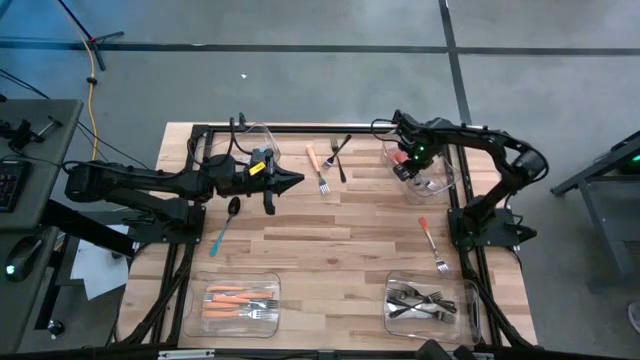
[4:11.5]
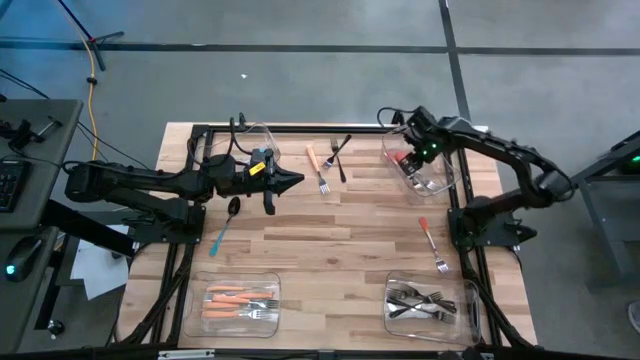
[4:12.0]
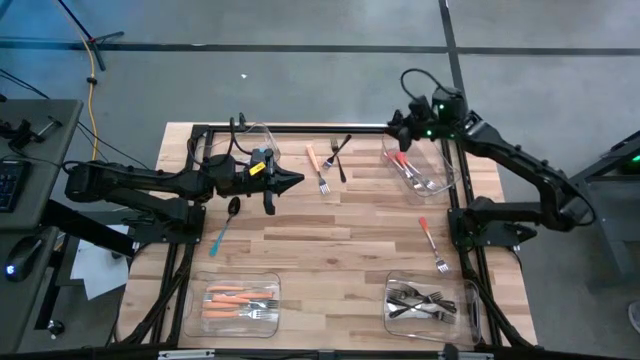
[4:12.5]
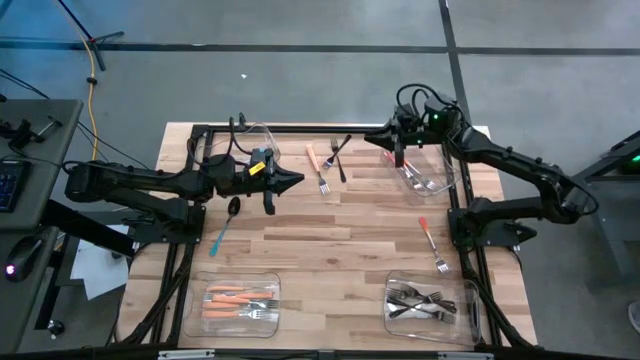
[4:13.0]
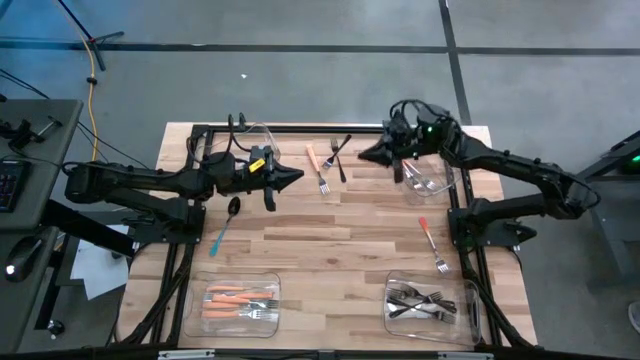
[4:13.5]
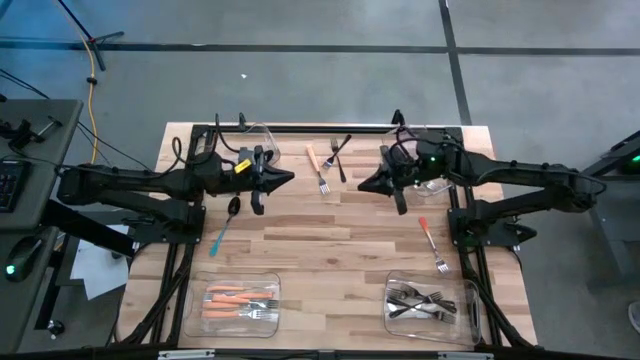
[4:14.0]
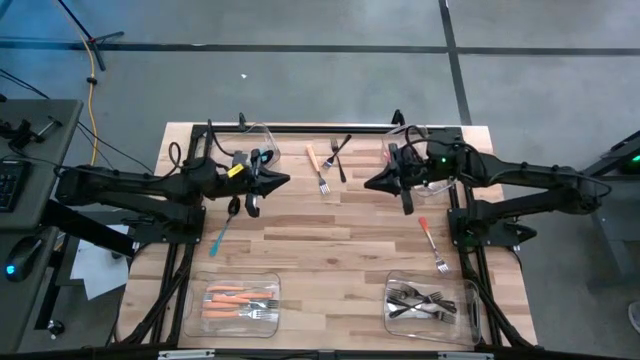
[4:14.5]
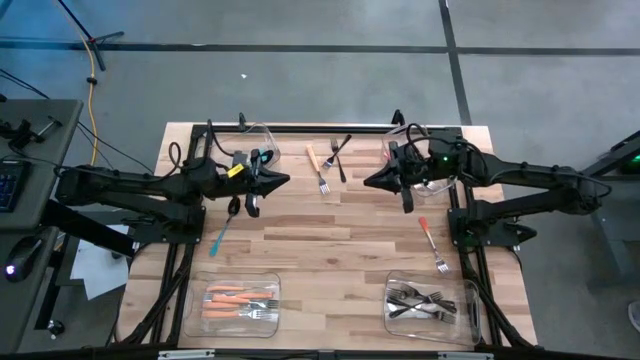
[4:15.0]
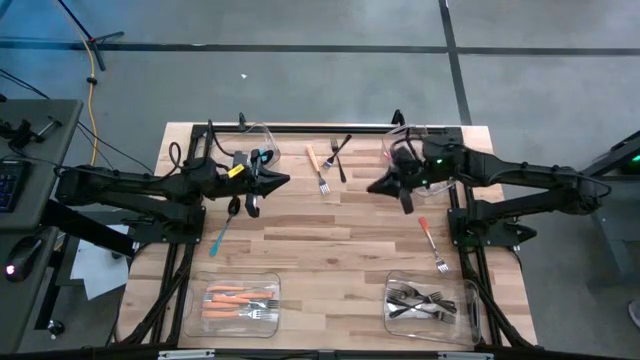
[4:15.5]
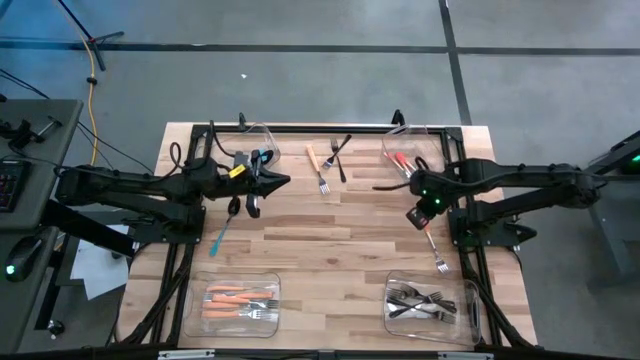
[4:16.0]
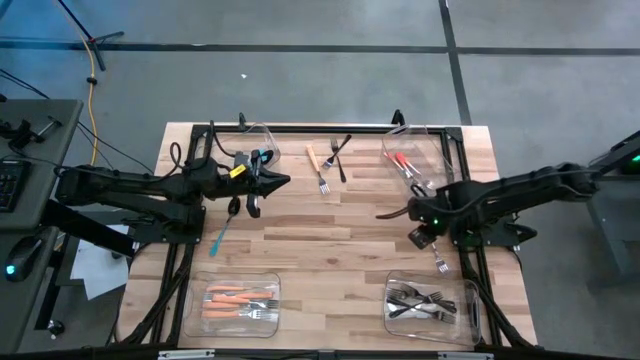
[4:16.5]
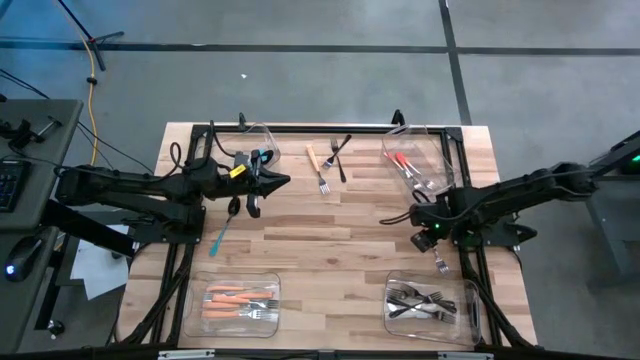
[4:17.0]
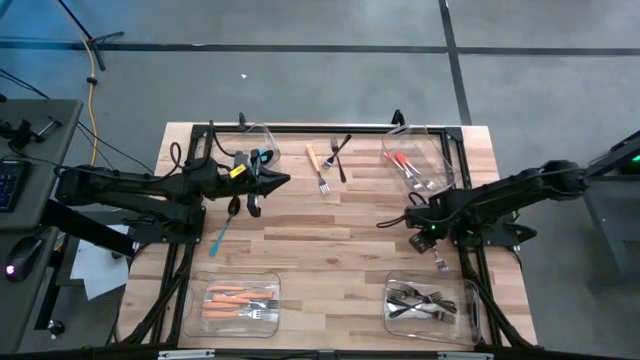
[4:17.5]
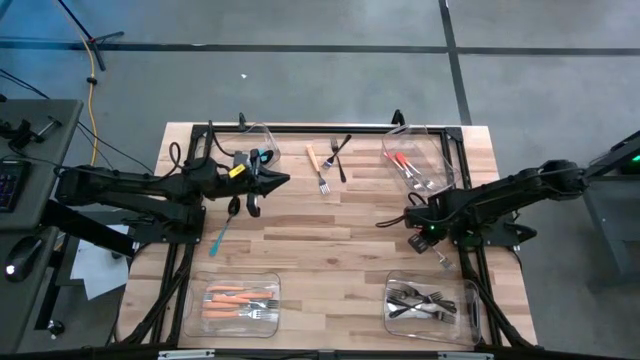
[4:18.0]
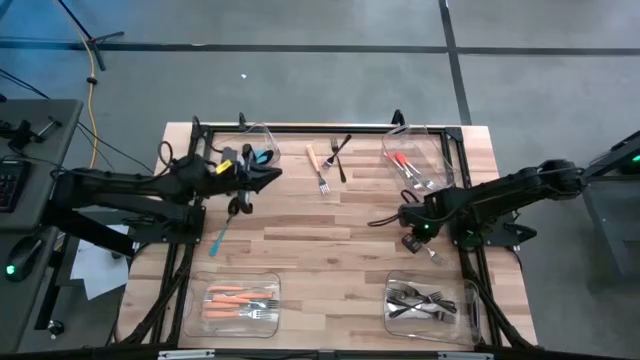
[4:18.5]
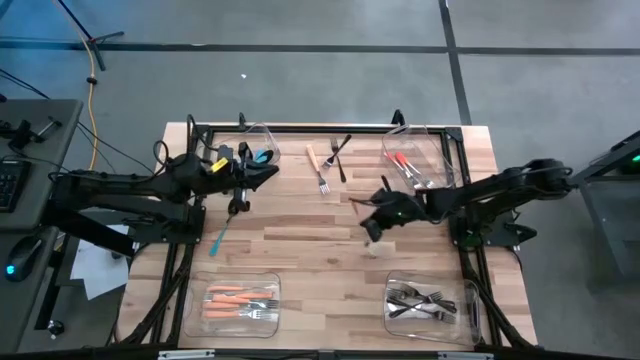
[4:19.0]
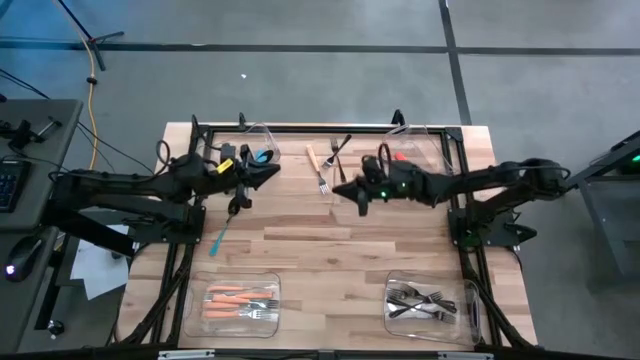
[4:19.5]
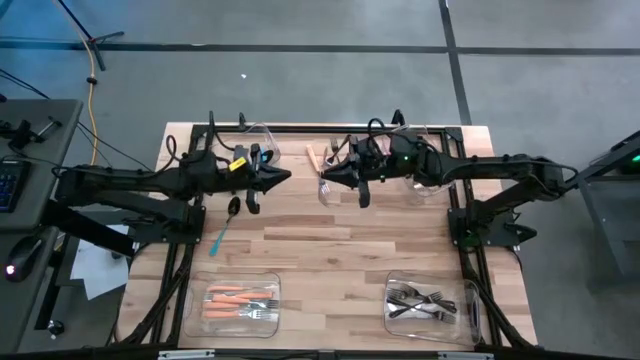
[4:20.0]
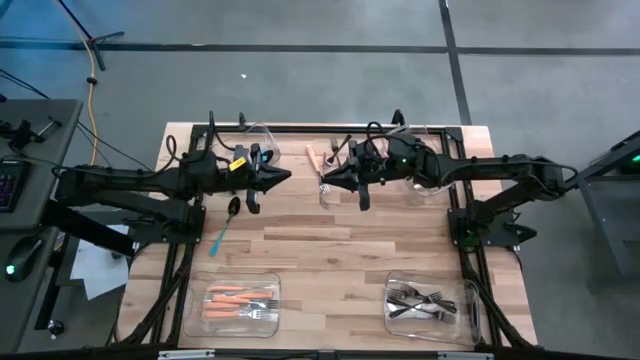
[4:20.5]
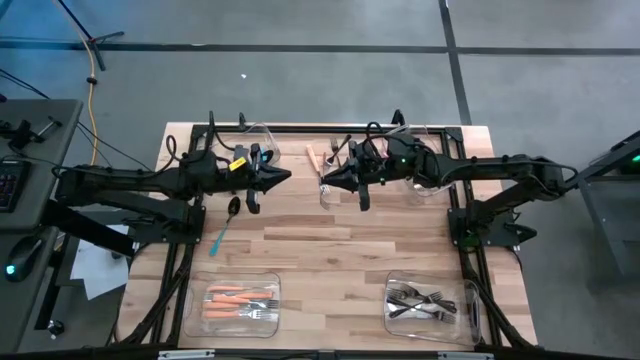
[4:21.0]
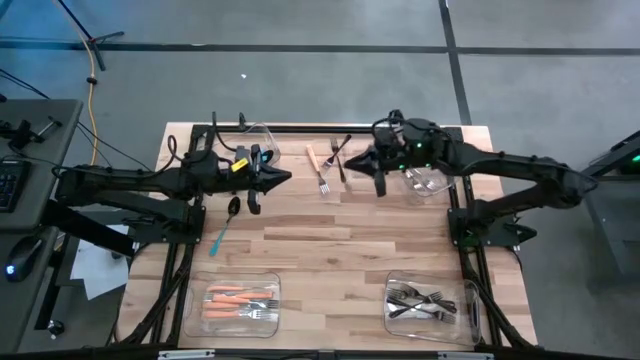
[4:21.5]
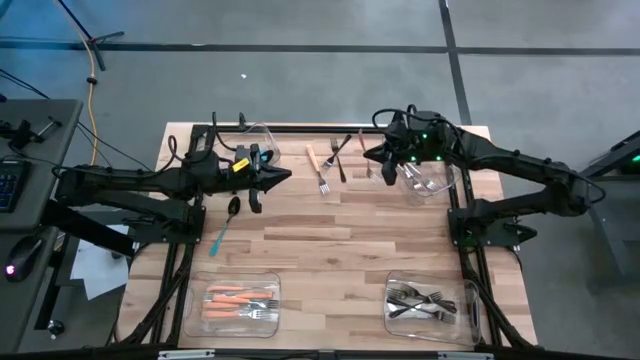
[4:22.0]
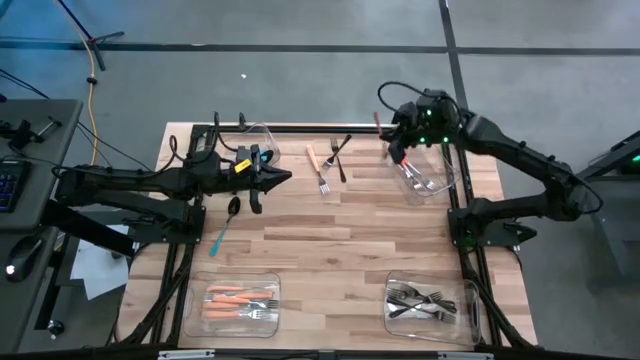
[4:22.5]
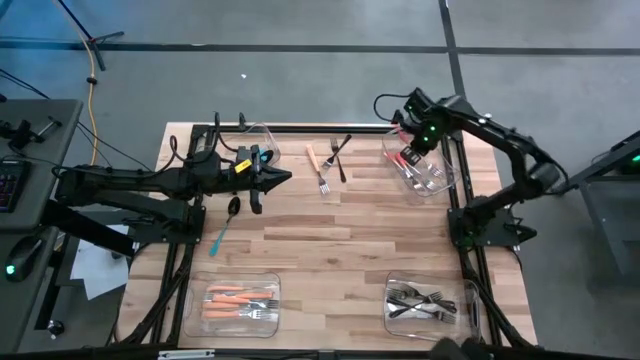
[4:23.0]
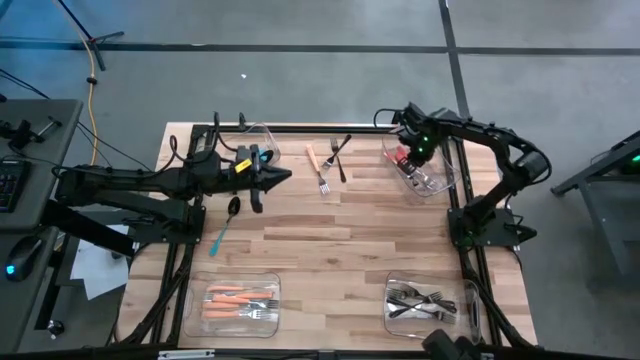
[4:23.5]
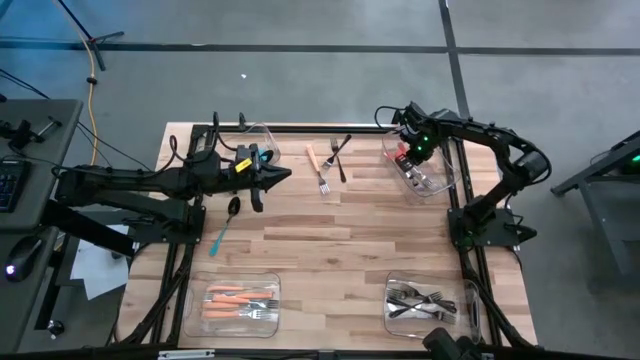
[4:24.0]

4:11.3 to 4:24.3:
Task: Sort silverware by color (type)
Put the orange fork into the top right transparent bin

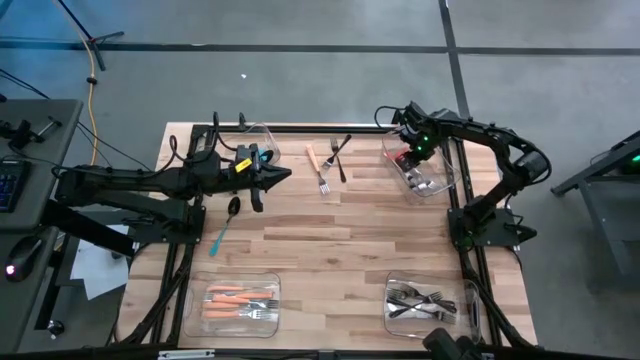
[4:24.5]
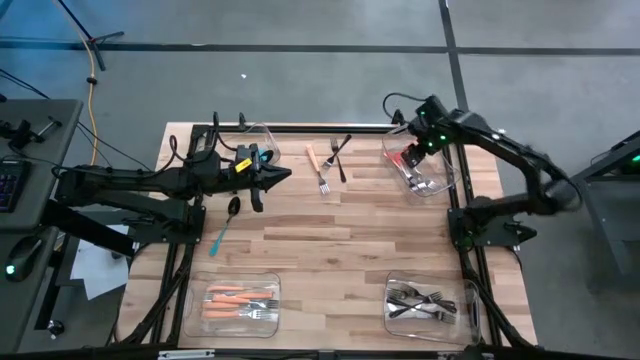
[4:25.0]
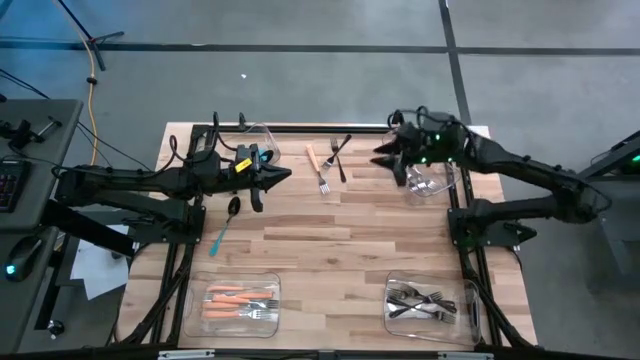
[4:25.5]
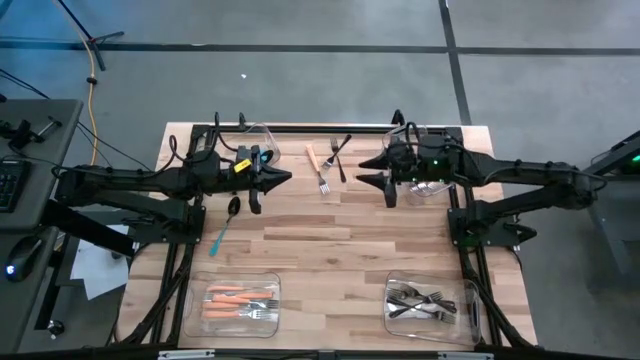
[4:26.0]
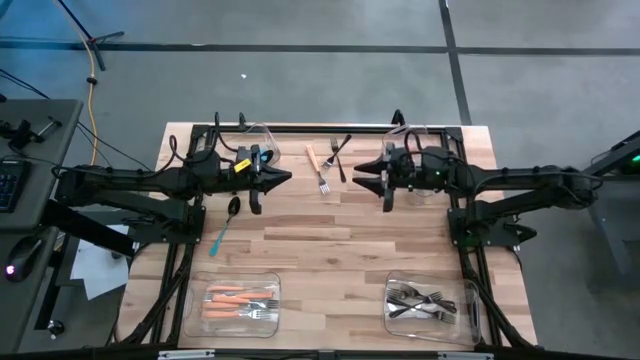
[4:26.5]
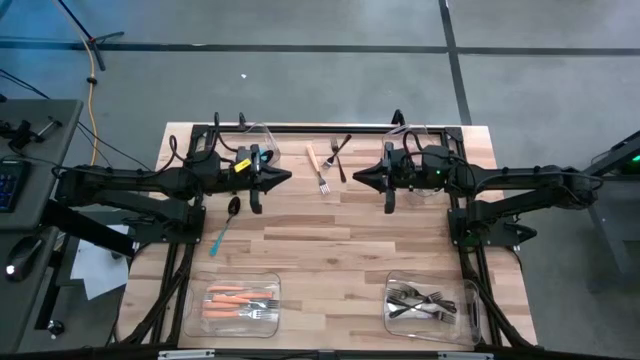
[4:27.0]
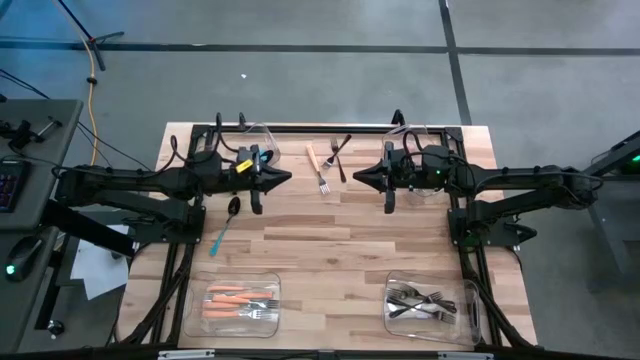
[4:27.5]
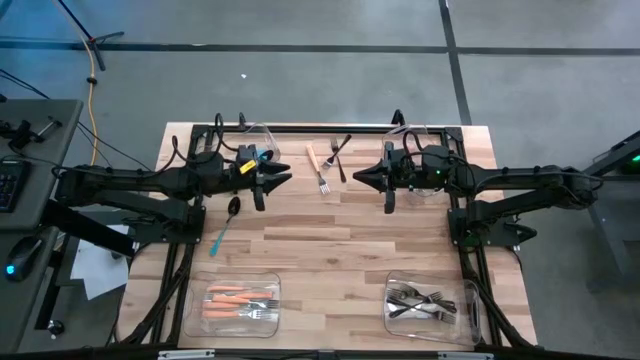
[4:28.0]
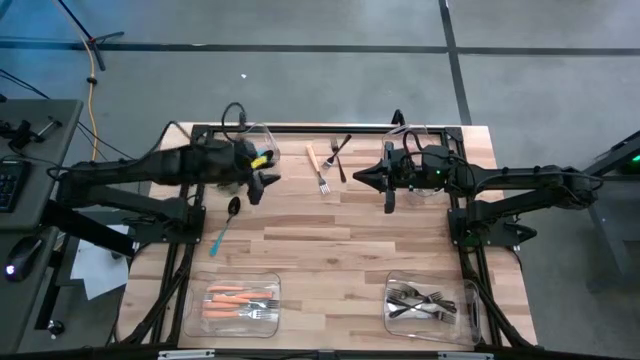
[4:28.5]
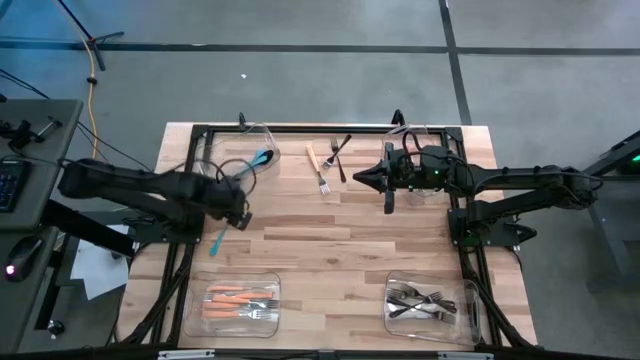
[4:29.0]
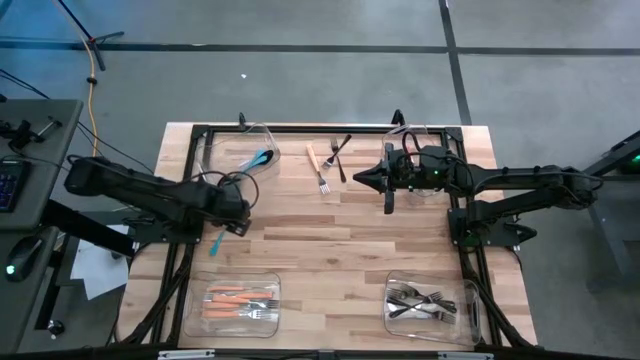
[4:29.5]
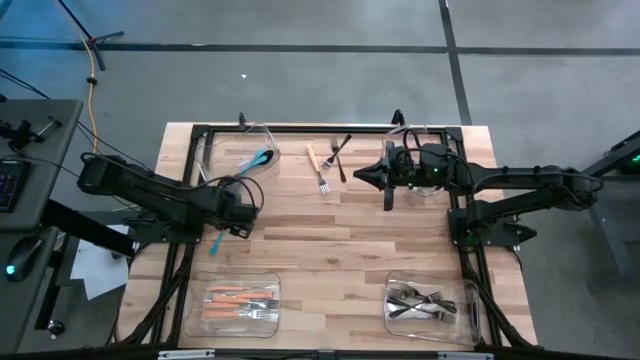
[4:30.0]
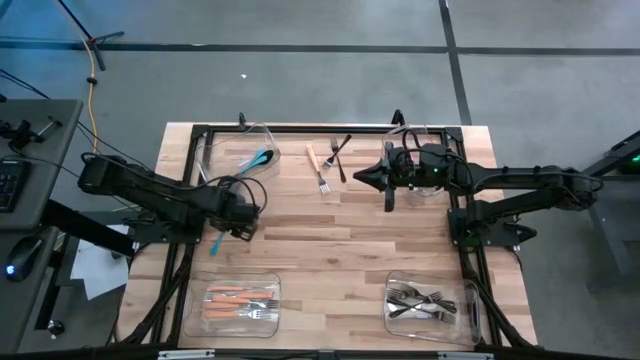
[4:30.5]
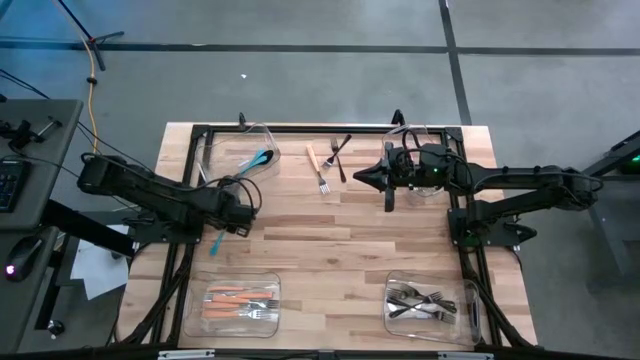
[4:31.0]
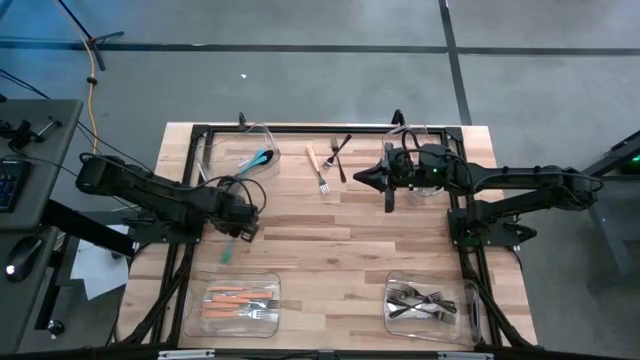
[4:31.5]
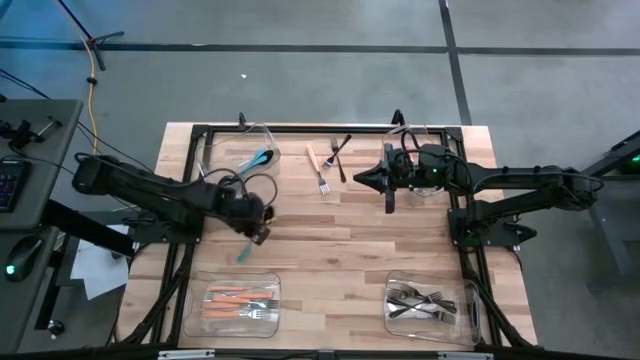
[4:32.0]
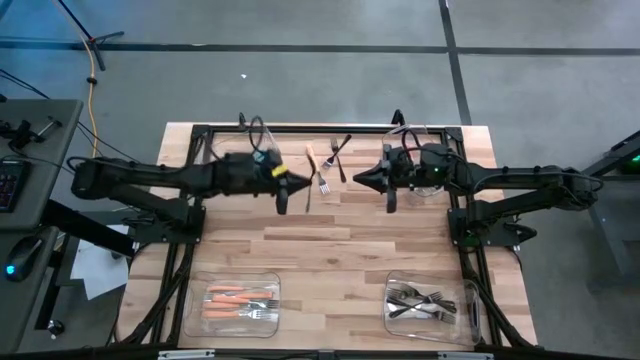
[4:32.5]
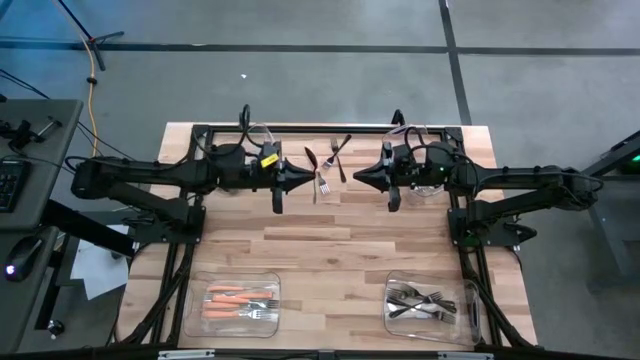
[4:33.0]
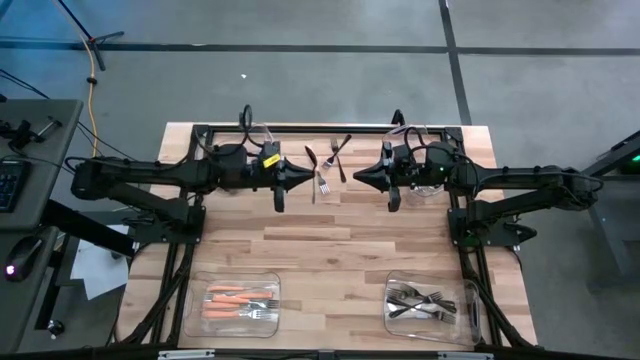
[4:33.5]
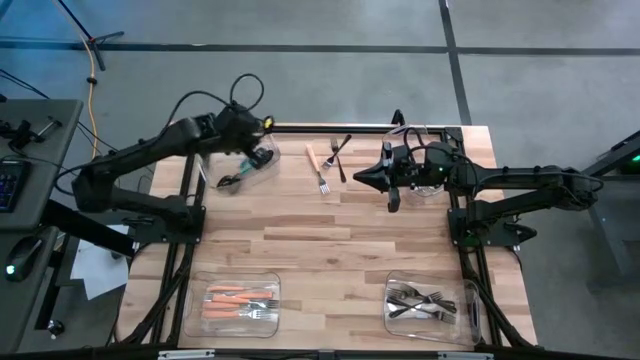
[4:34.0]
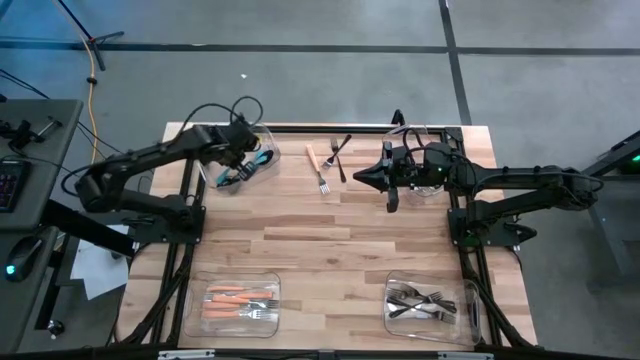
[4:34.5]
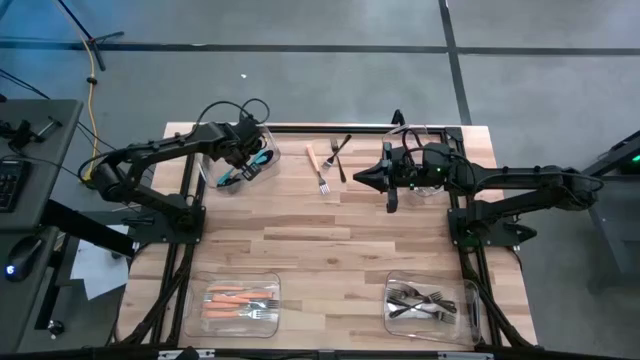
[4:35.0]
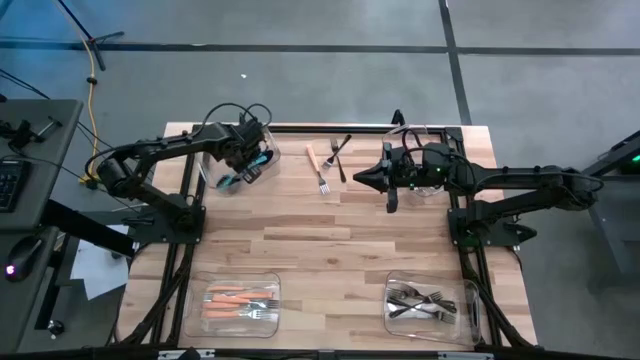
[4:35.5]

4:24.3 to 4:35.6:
Put the blue spoon into the top left transparent bin
